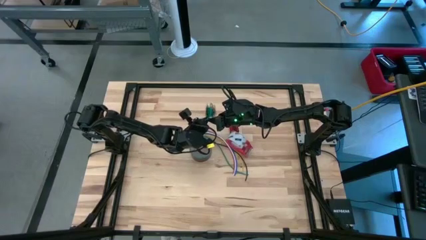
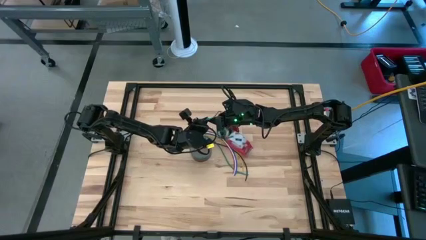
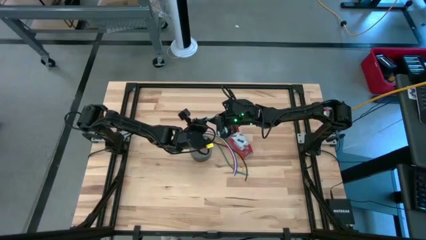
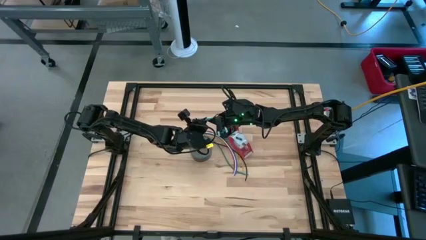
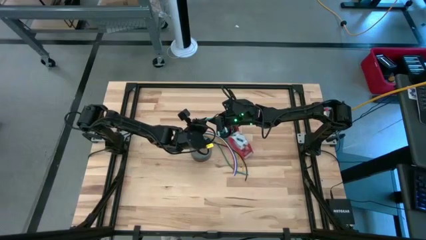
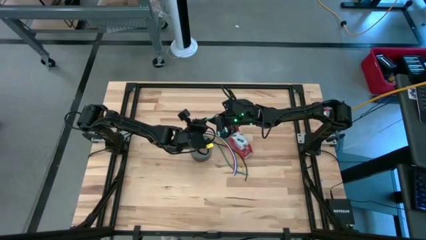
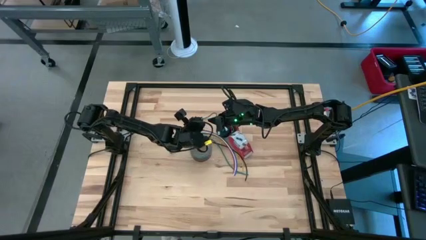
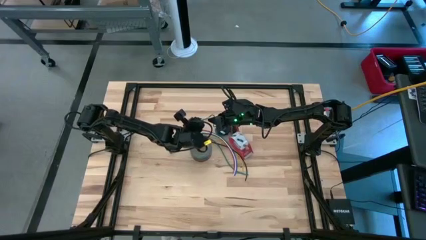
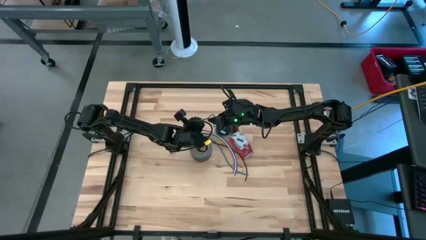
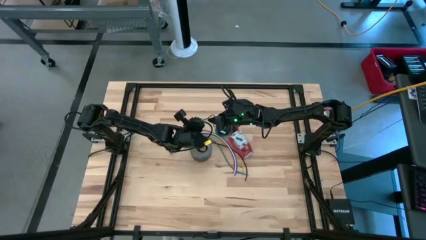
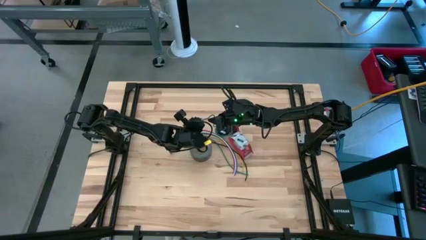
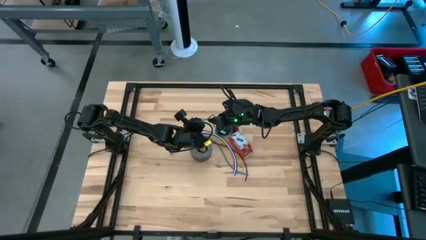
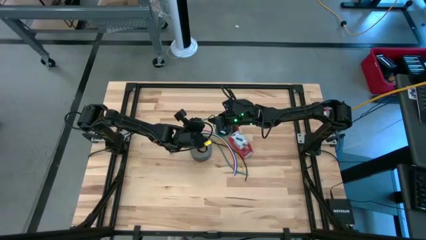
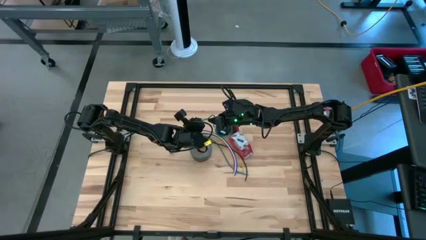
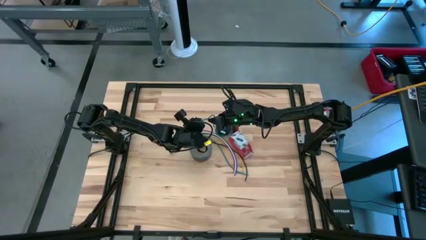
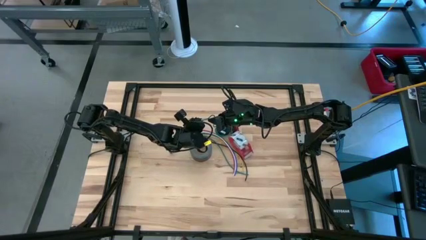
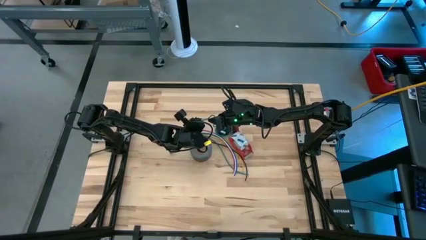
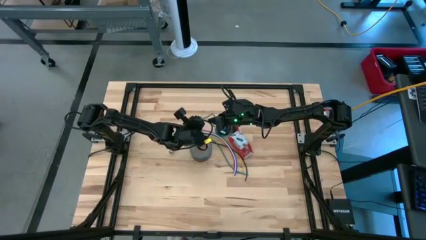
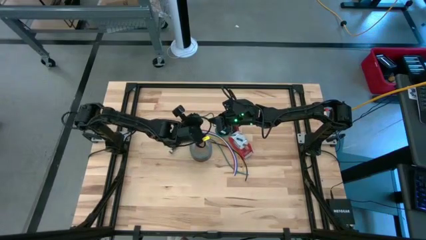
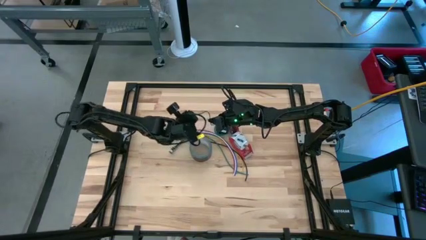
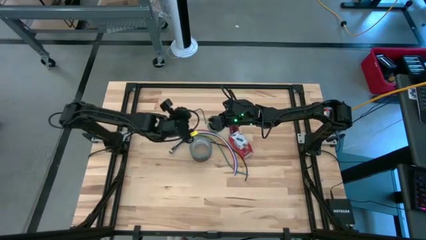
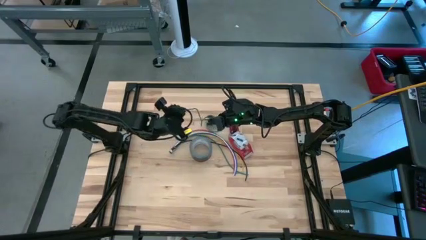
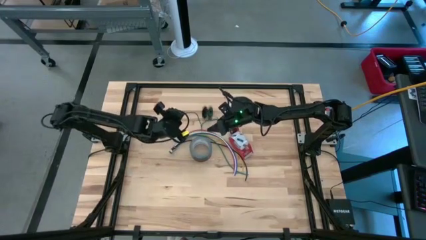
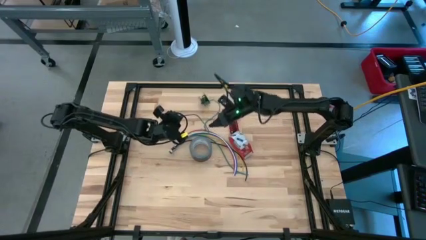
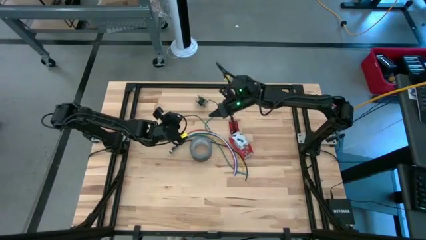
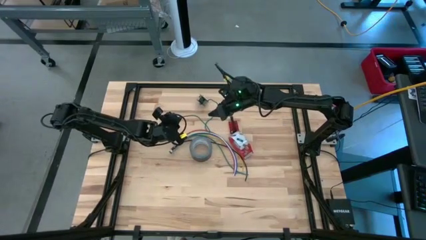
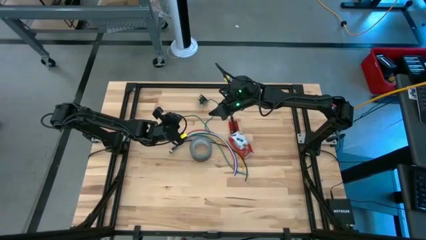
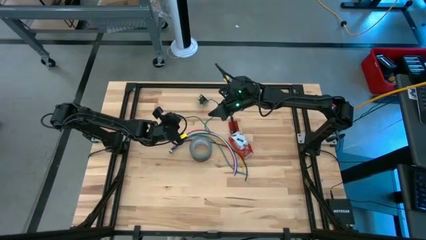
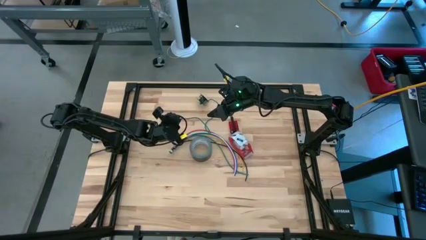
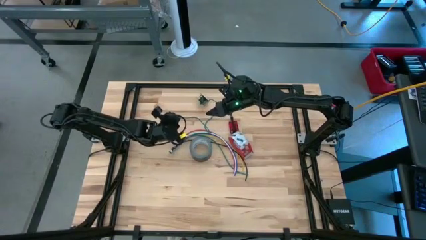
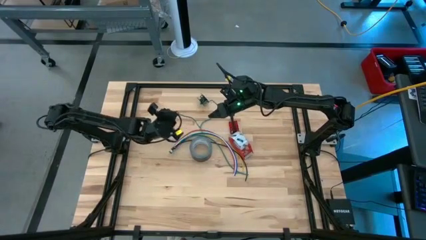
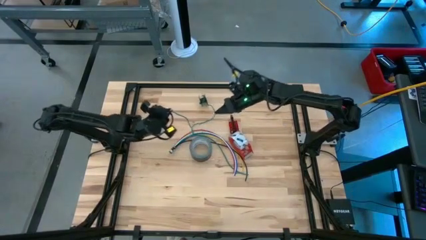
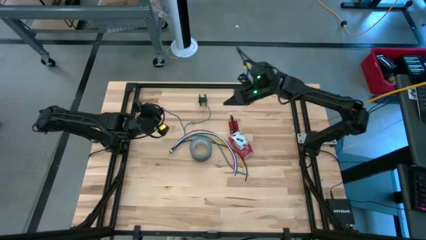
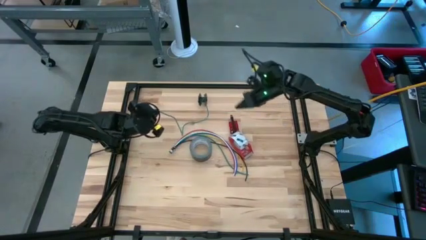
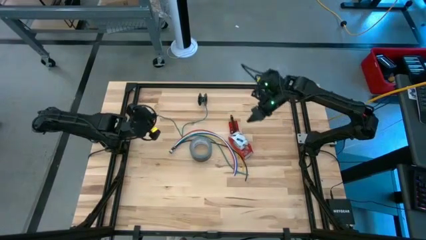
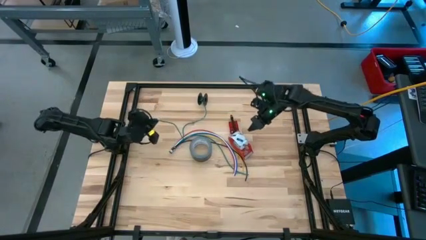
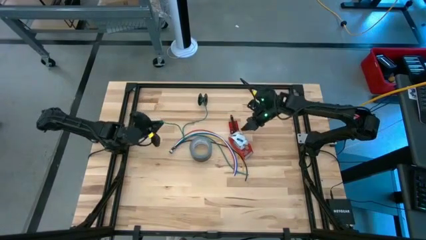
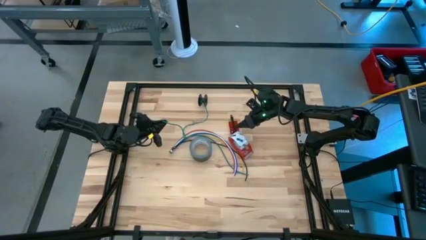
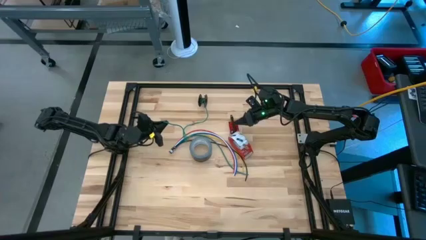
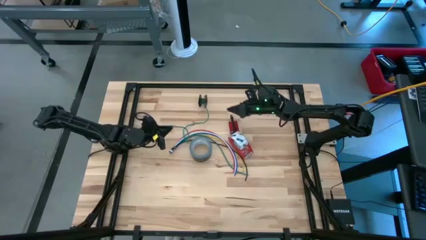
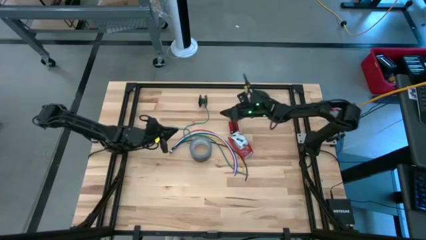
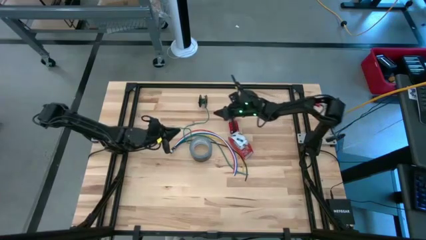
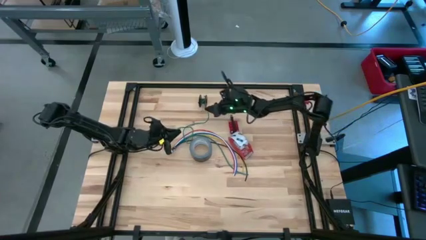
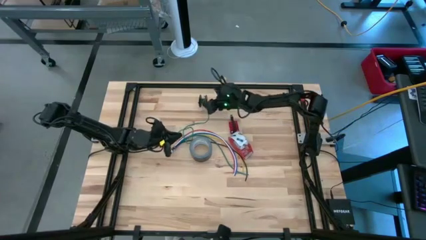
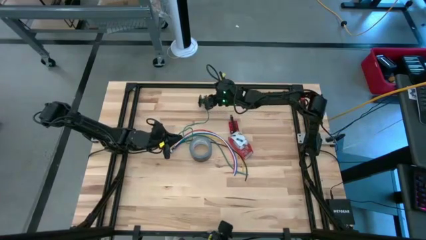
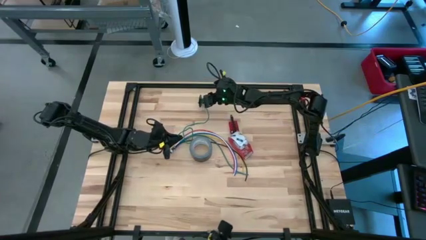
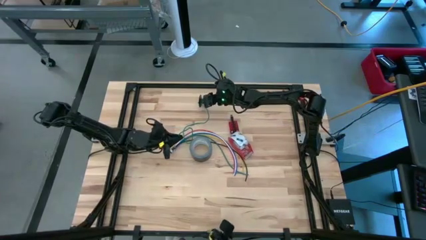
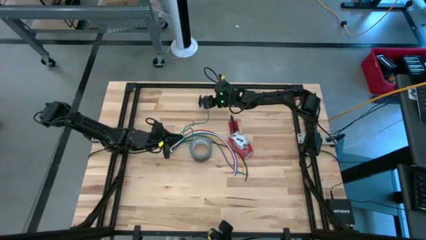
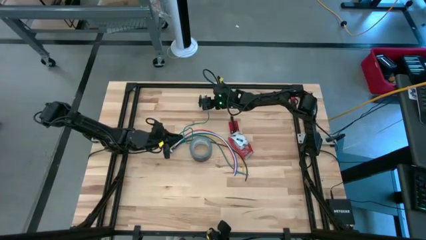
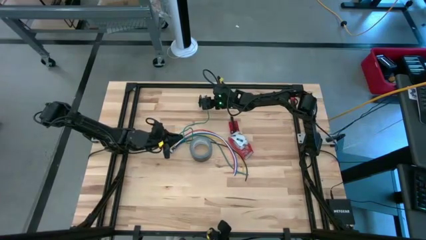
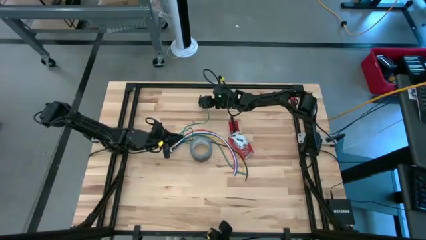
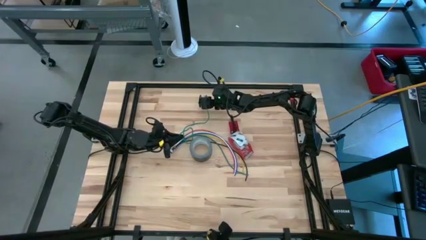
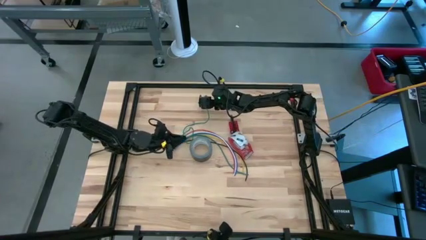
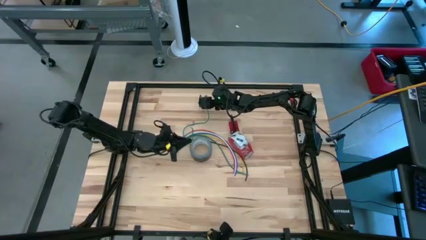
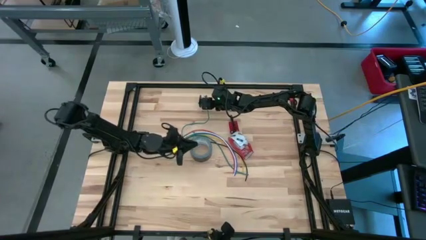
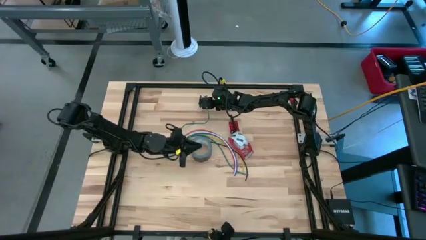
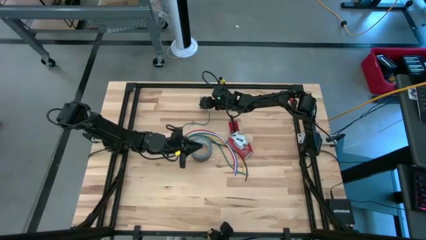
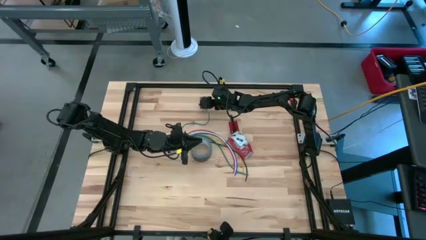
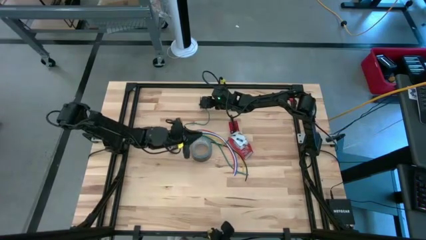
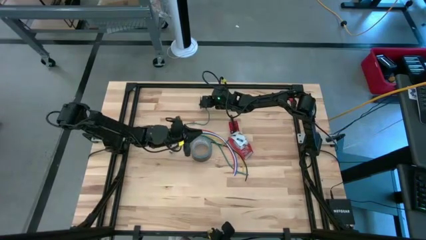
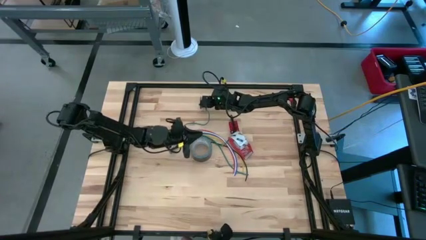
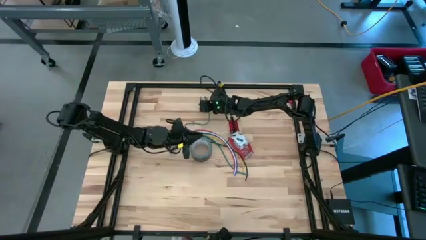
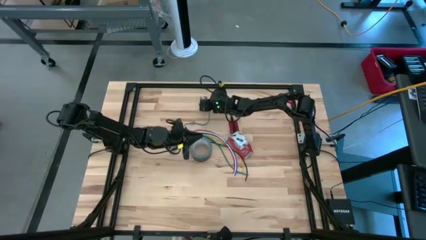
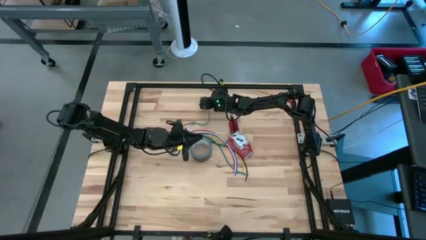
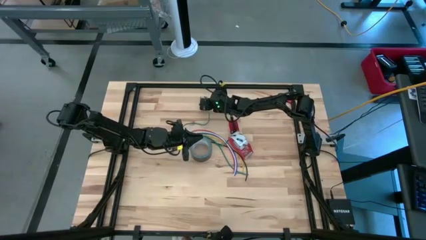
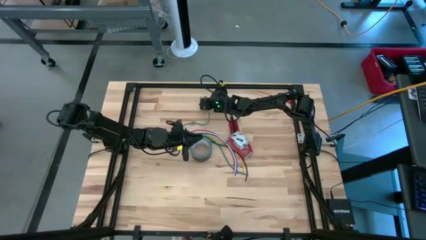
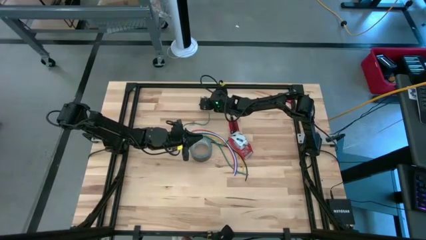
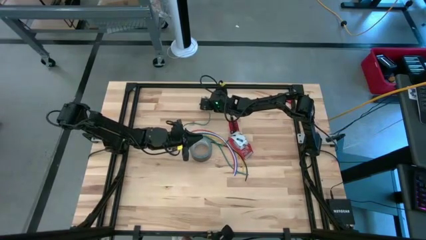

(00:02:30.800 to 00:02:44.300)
Task: Coil cords
Coil the green wire onto the black spool
